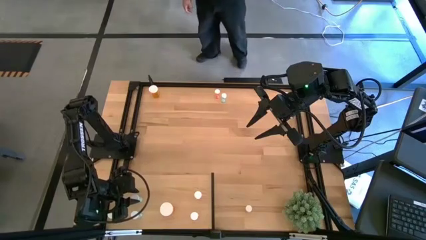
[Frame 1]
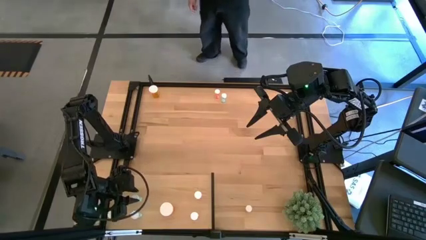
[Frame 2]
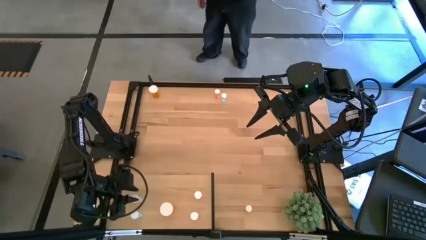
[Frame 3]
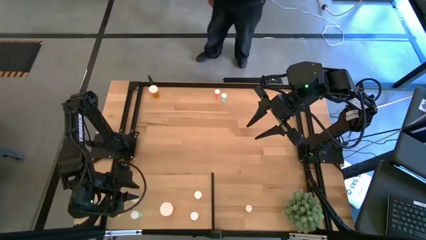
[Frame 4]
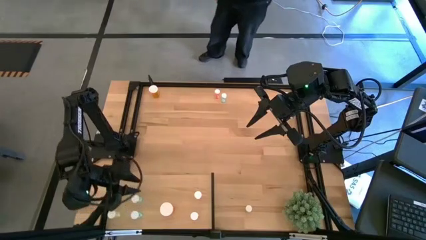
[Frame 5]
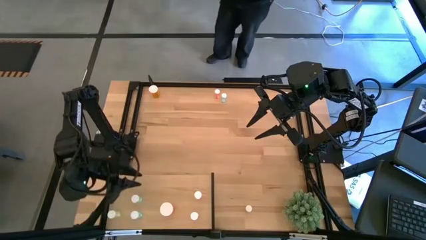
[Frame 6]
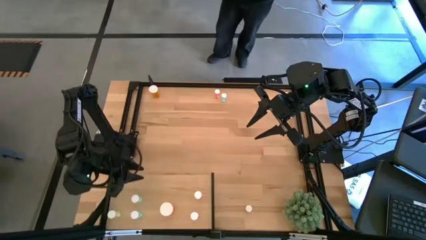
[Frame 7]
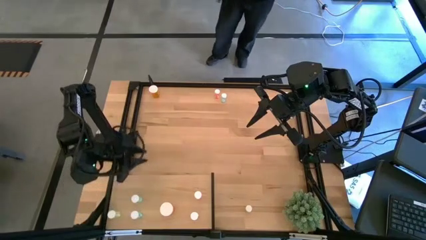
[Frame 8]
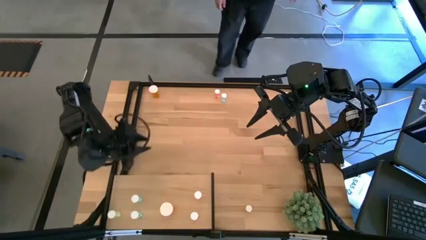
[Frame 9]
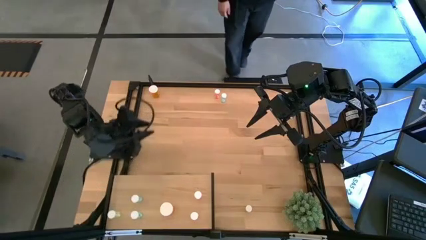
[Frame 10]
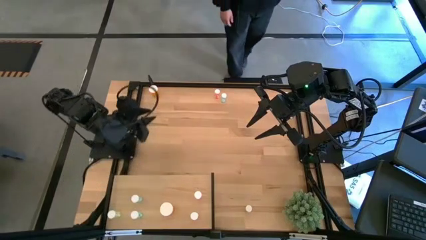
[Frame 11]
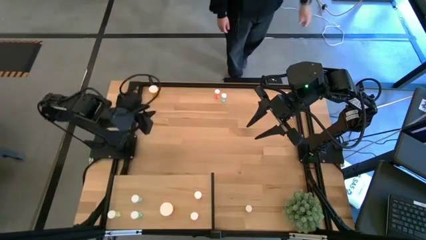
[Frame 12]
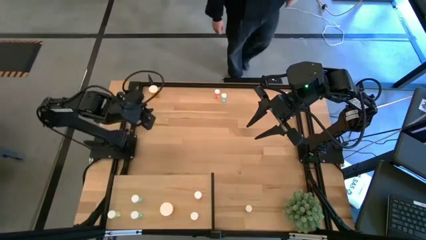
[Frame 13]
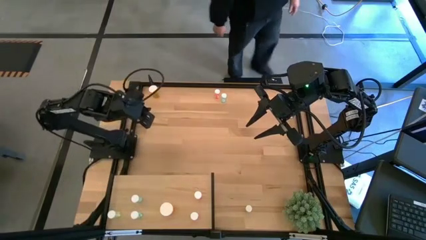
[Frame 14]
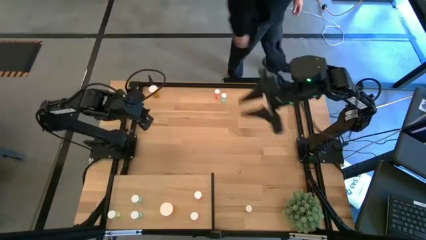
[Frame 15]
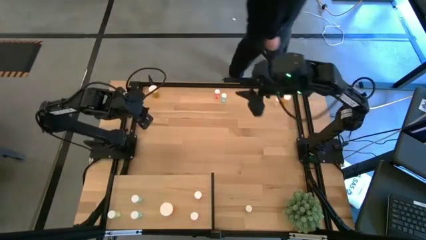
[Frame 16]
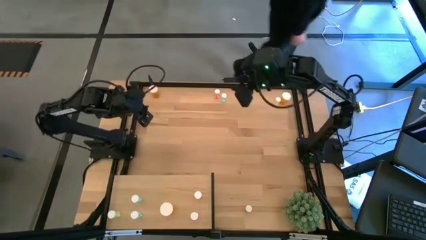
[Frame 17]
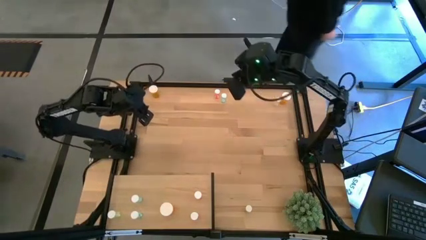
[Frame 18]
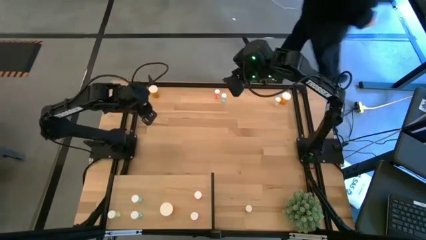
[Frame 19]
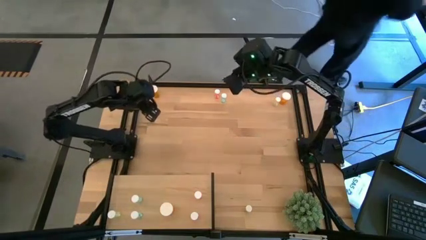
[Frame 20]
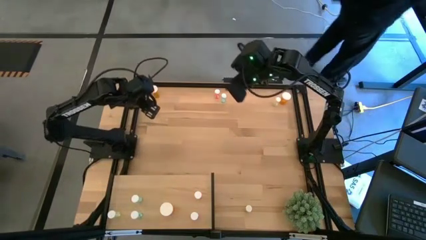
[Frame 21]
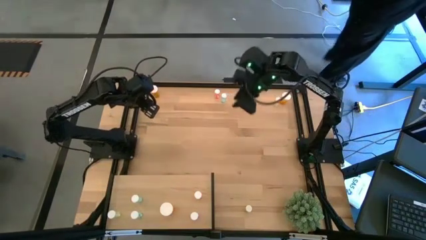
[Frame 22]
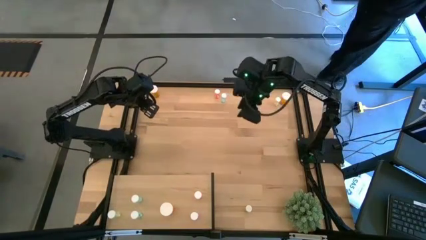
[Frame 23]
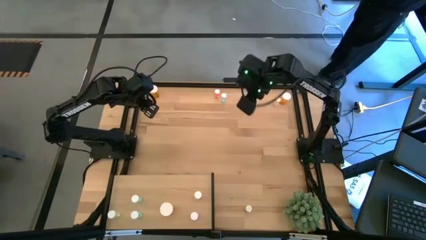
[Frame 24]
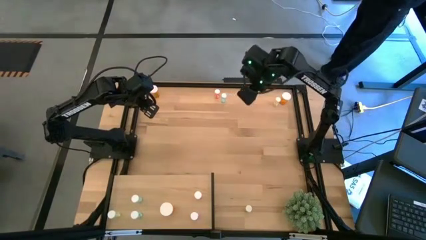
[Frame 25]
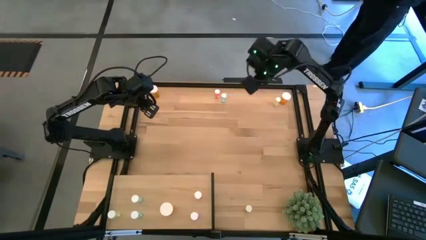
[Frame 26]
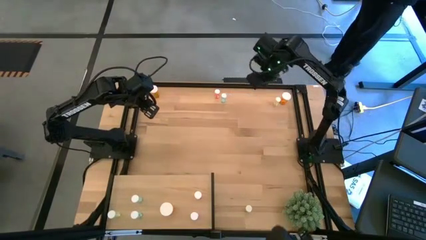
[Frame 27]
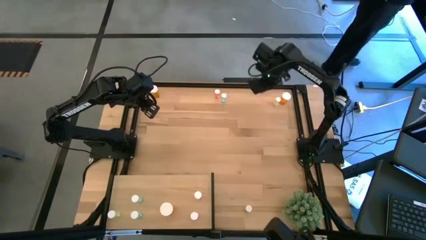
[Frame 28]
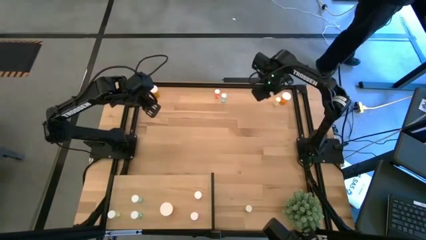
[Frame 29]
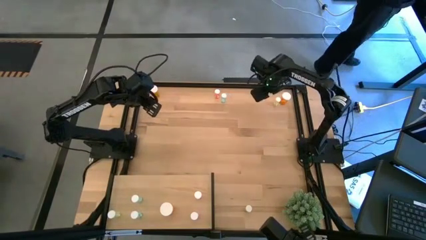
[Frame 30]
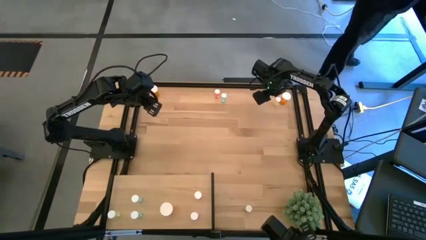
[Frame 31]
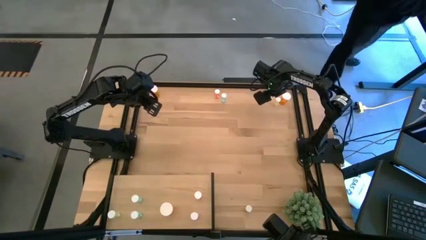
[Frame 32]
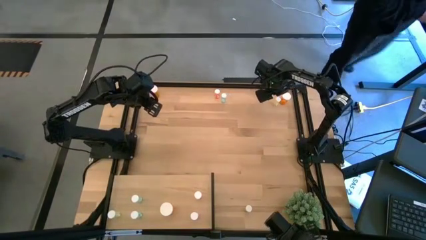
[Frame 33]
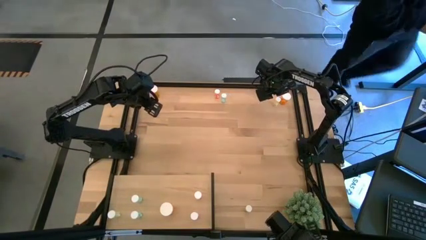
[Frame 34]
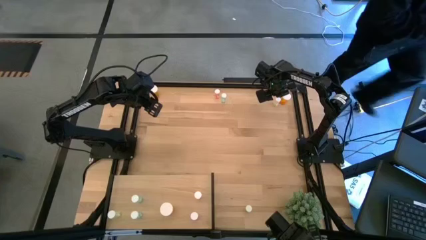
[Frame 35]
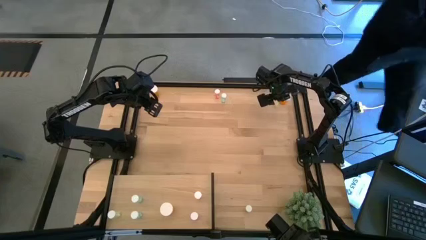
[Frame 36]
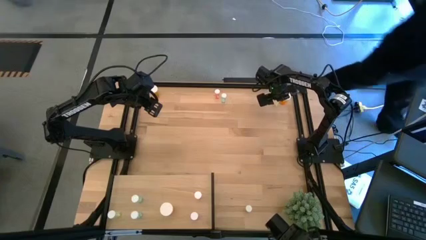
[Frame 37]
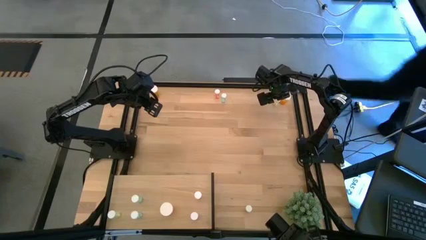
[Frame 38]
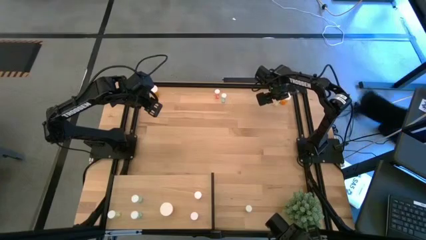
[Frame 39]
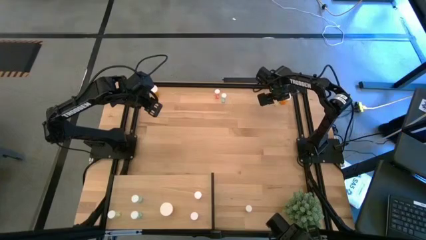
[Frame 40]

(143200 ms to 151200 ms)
Task: Pick and place medicine bottles onto shelf by color
Put the top right yellow pill bottle on the shelf aligned with the other yellow pill bottle

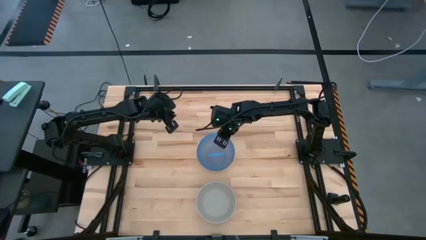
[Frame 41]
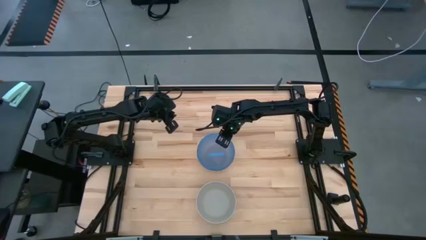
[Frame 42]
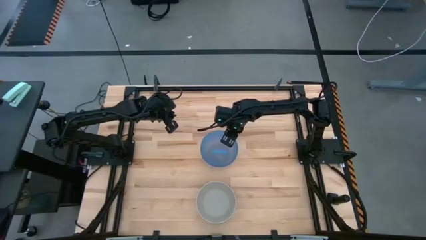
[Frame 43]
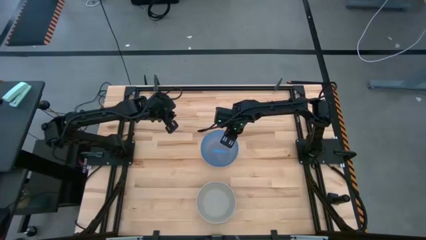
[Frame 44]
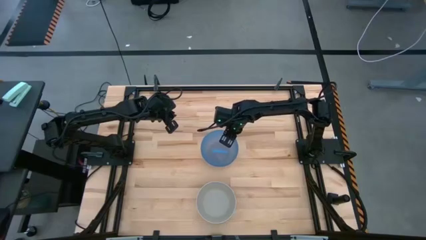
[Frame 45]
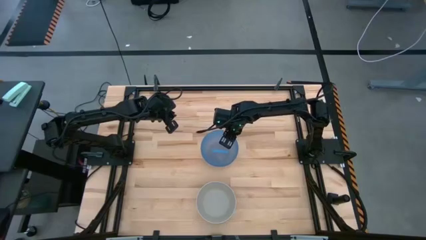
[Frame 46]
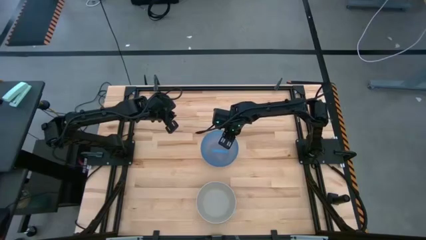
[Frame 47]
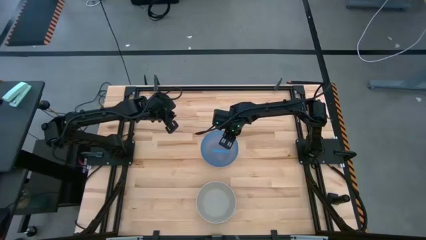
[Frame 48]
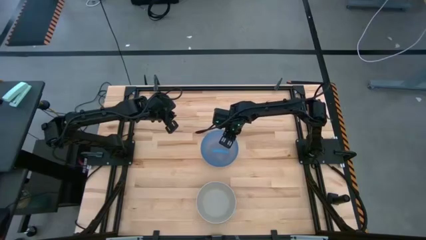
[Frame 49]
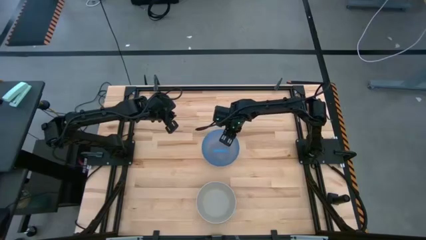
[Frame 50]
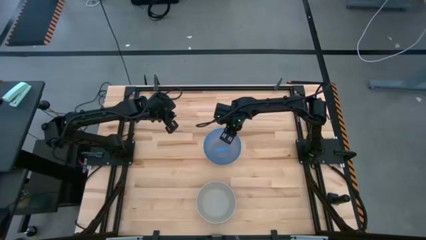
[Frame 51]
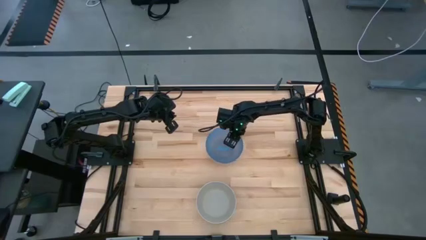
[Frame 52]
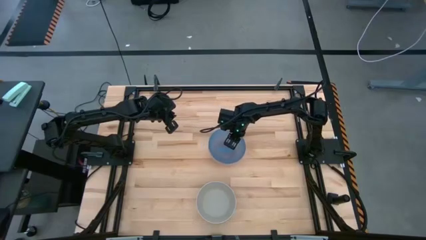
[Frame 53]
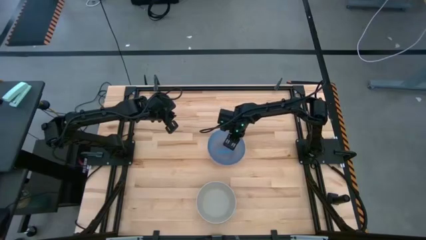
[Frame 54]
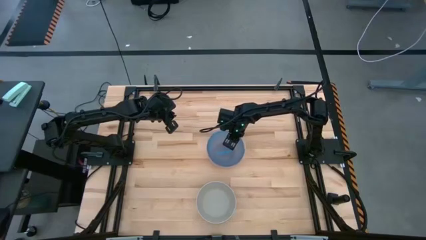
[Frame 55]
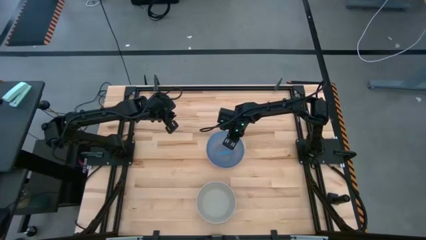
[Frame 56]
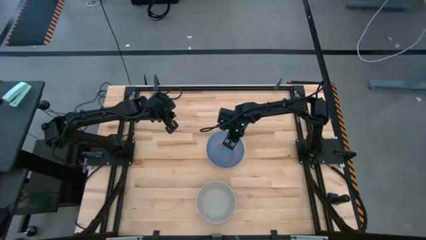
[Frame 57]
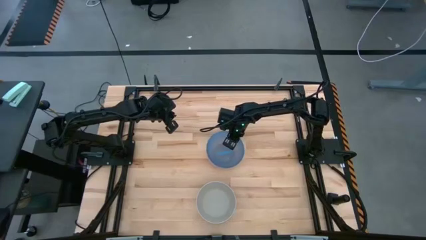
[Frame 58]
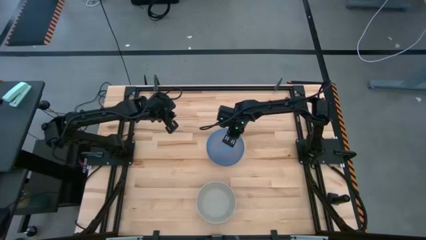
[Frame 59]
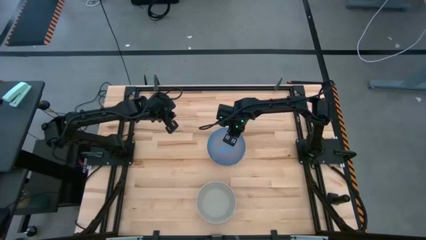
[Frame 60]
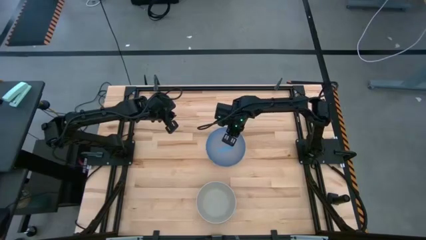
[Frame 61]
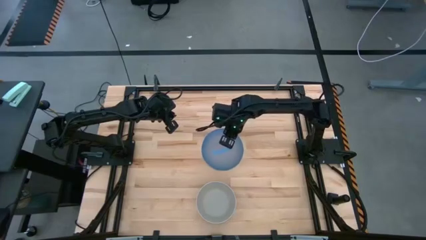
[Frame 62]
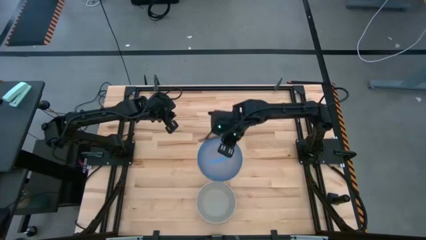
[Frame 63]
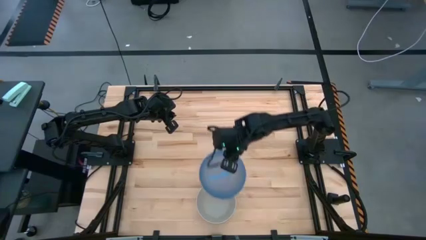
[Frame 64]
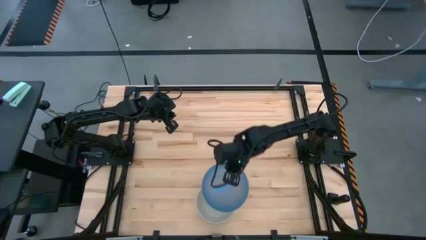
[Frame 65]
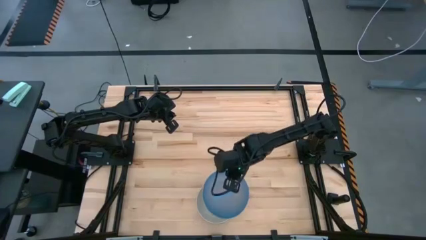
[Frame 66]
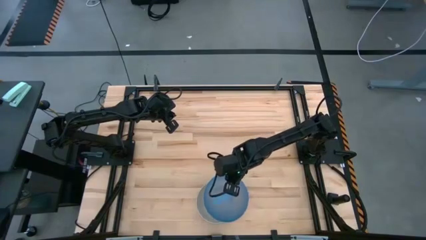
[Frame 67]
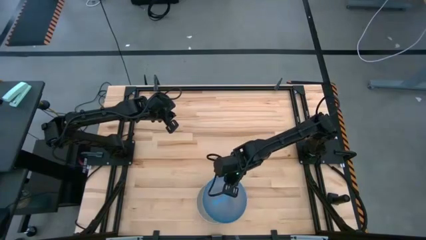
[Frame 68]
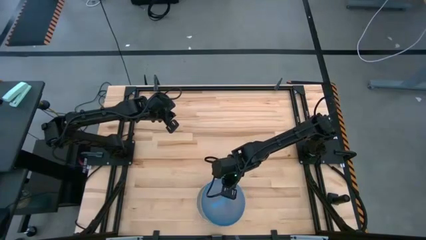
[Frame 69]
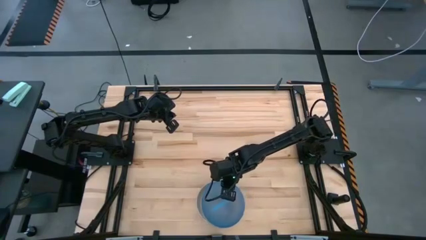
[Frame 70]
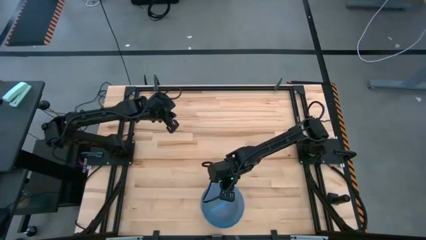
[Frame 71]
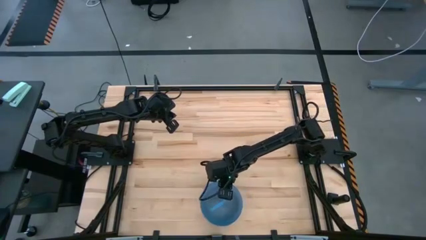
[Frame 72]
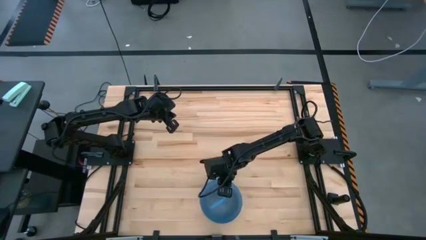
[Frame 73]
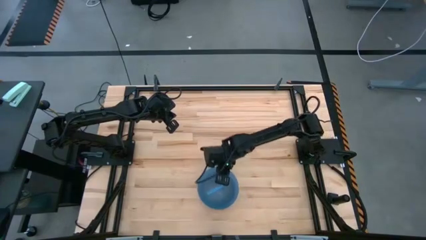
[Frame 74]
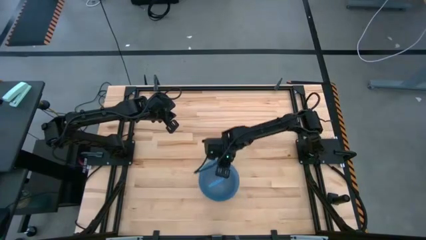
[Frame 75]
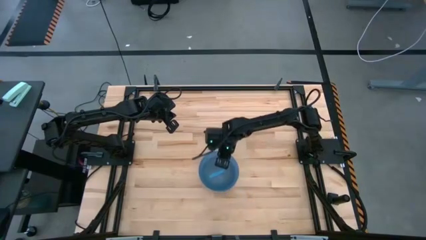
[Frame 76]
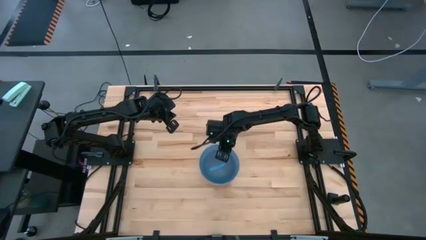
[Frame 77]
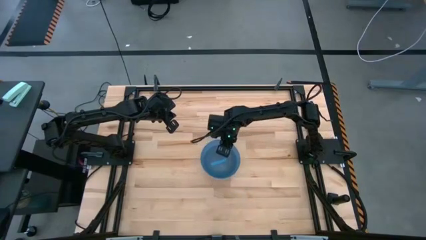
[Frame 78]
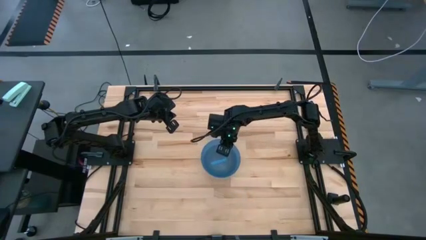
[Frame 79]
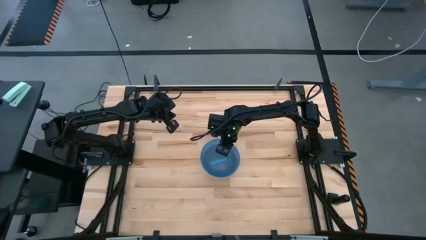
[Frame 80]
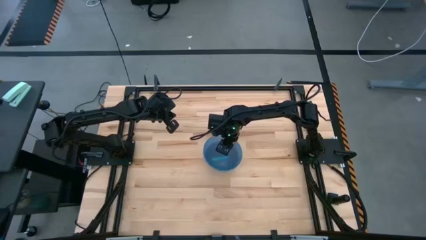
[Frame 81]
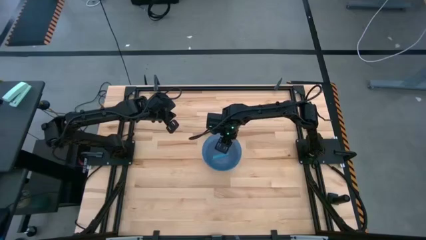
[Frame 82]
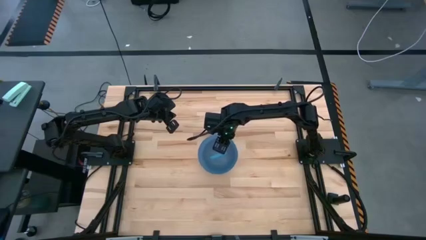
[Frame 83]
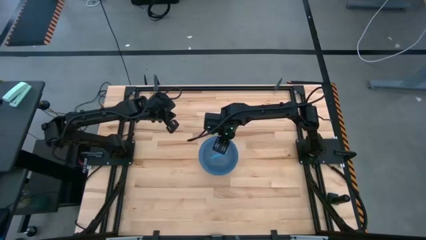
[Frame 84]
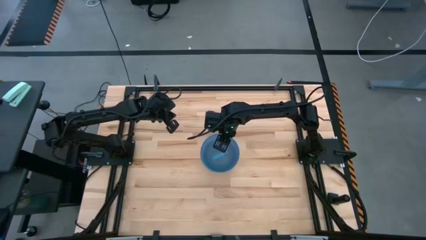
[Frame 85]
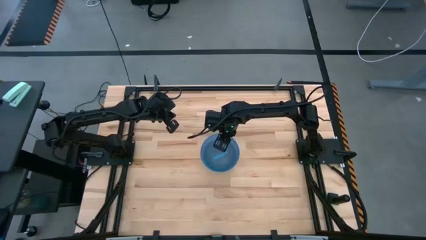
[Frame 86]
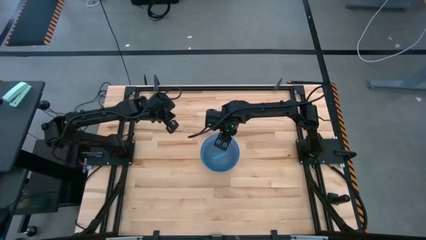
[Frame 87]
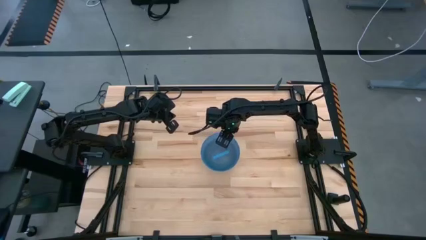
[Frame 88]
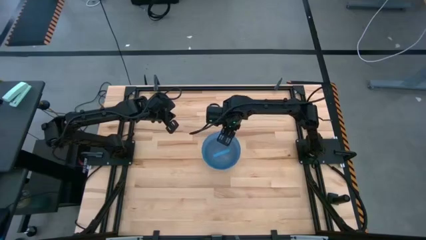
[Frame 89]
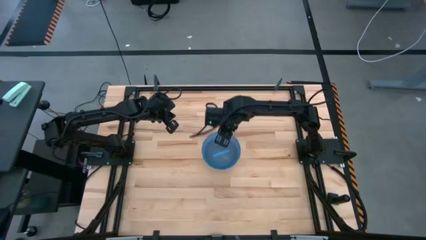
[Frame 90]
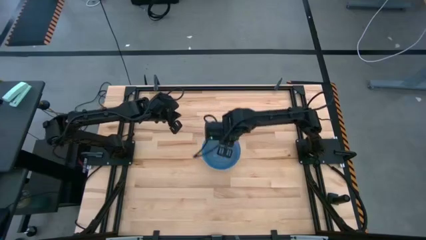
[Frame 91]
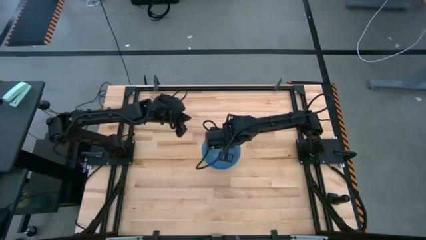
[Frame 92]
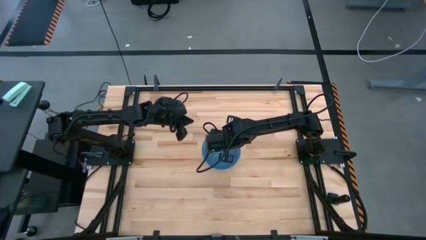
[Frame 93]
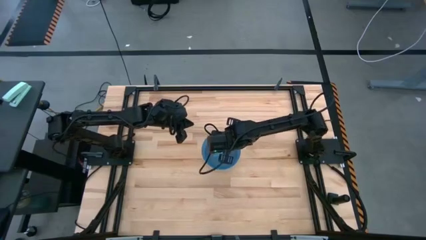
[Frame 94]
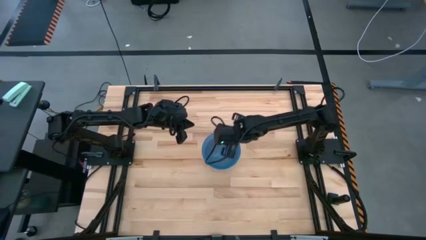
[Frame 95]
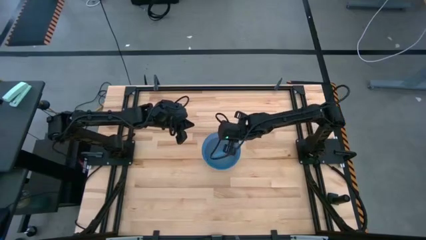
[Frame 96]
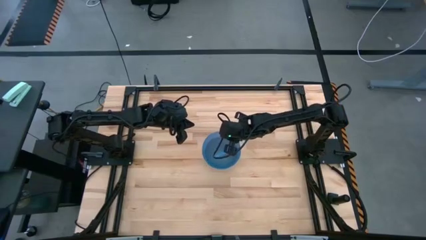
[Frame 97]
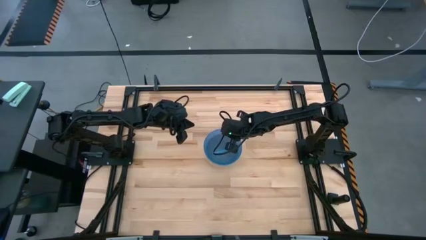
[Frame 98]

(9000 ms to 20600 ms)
Task: Nest bowls inside each other
Stack the stacked bowls on top of the white bowl
